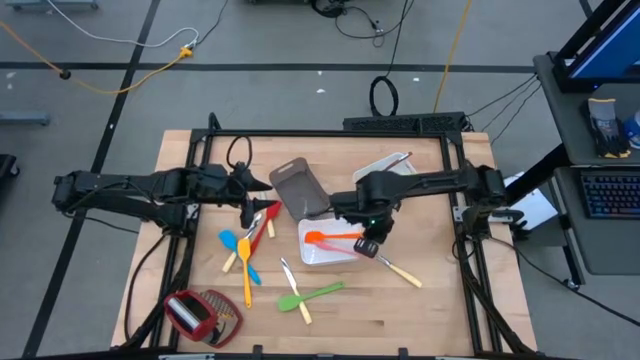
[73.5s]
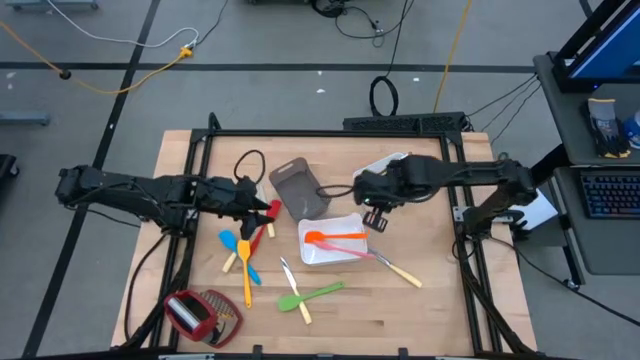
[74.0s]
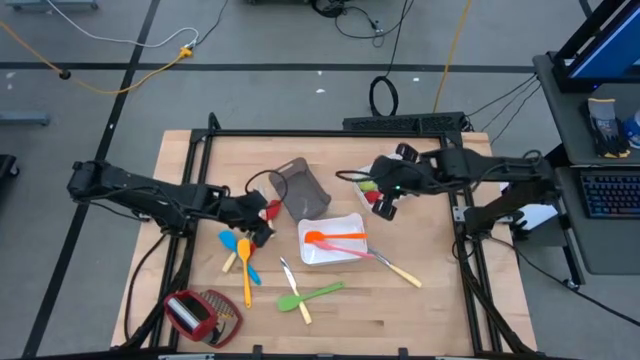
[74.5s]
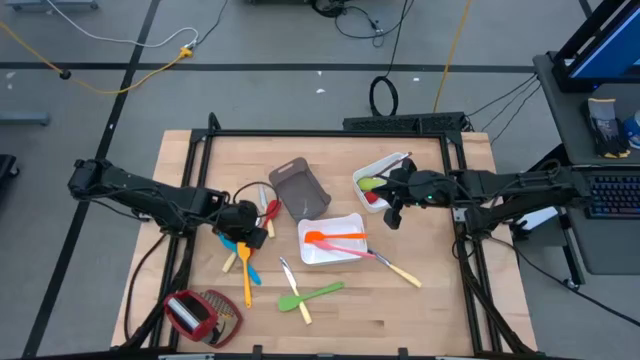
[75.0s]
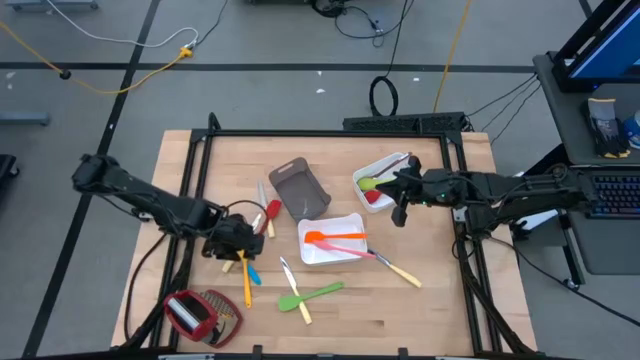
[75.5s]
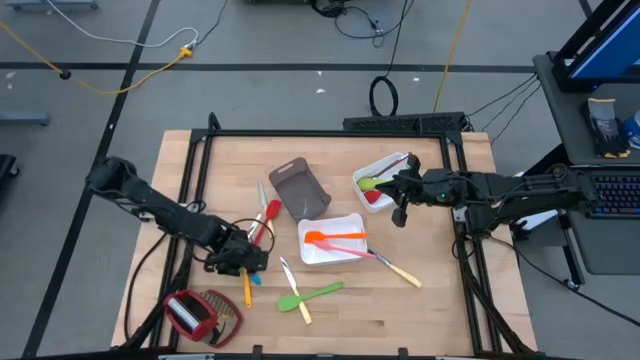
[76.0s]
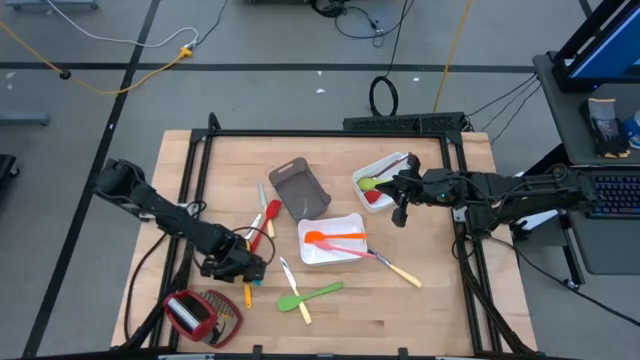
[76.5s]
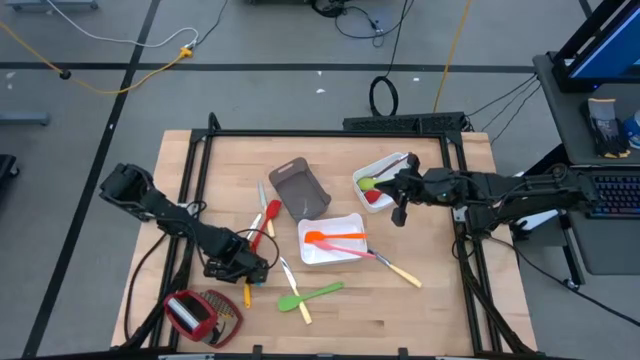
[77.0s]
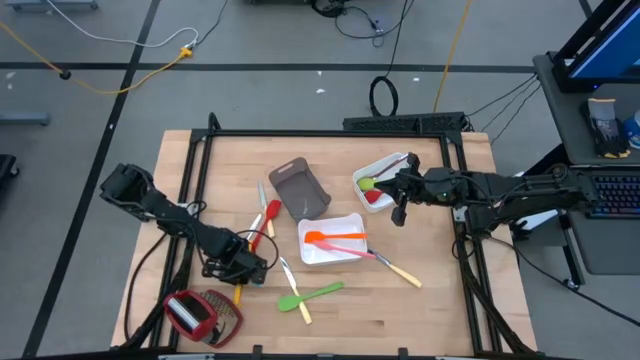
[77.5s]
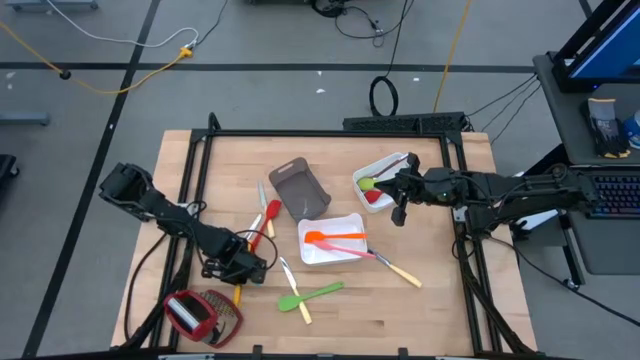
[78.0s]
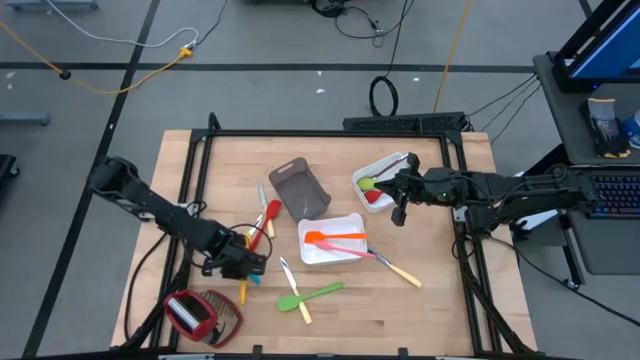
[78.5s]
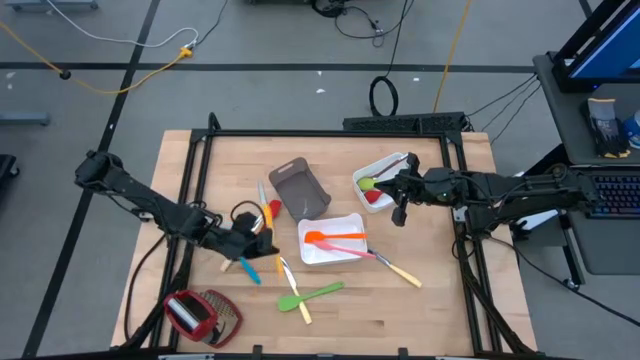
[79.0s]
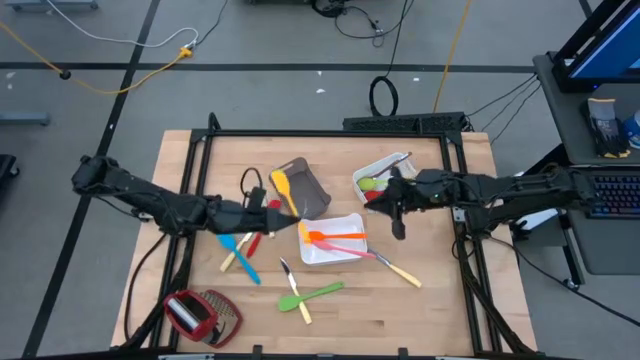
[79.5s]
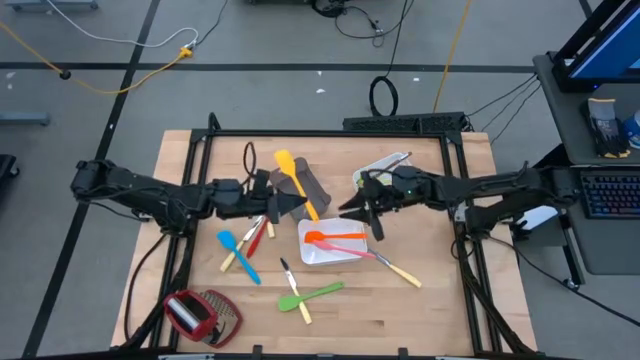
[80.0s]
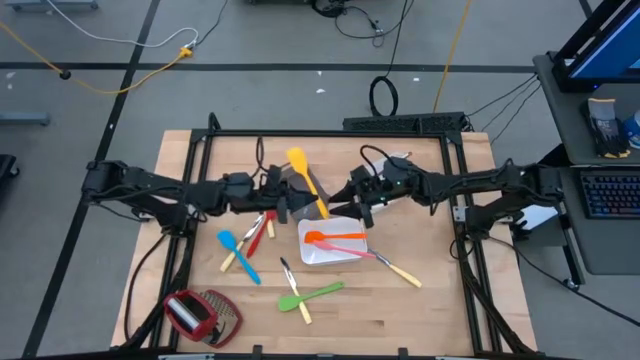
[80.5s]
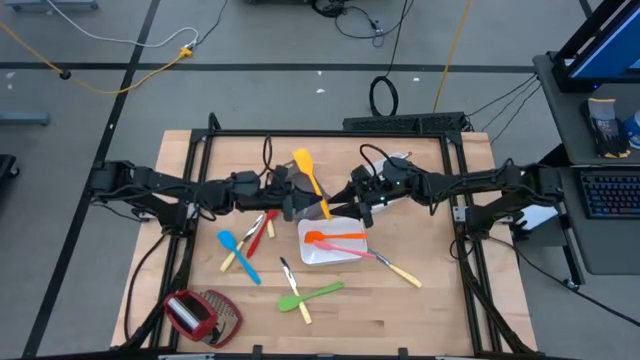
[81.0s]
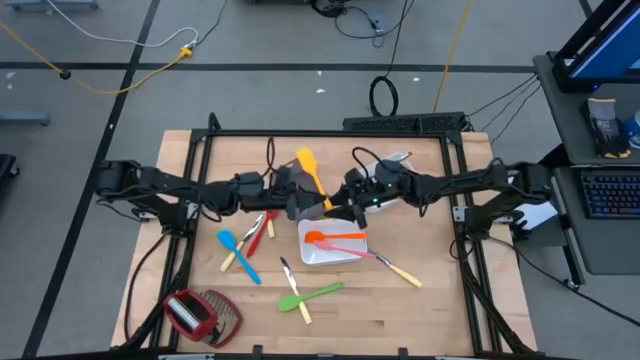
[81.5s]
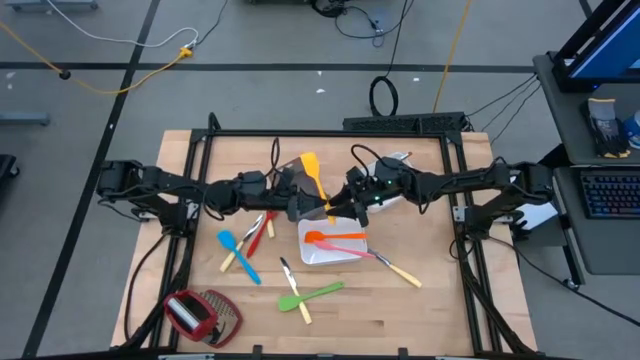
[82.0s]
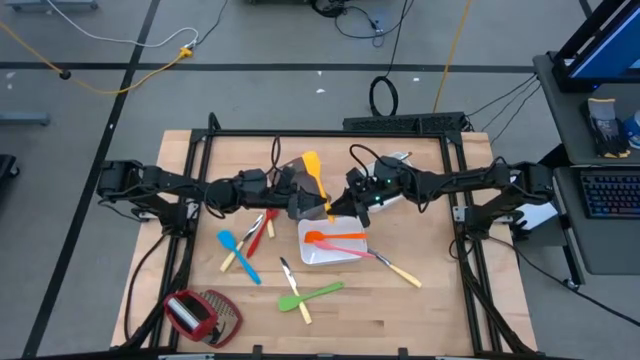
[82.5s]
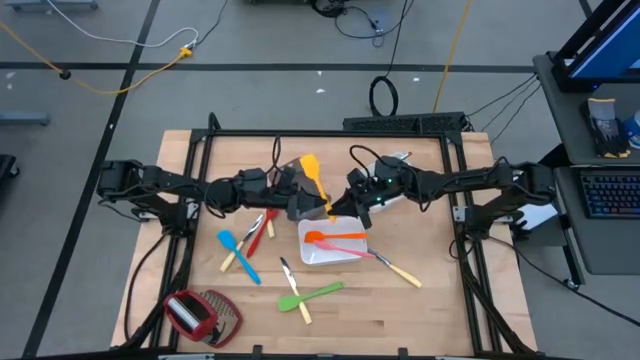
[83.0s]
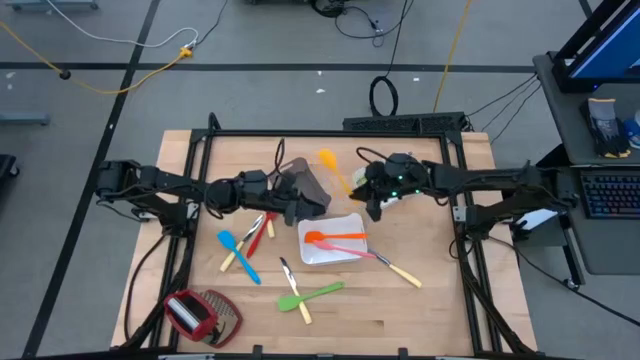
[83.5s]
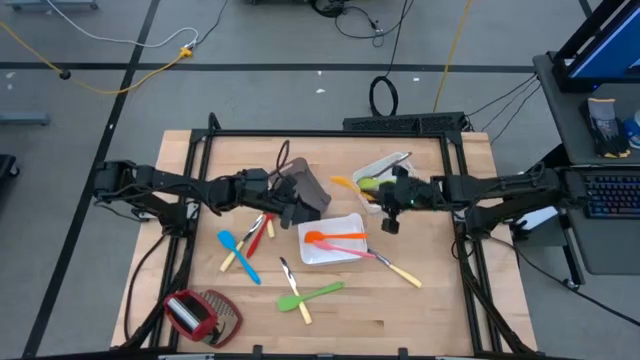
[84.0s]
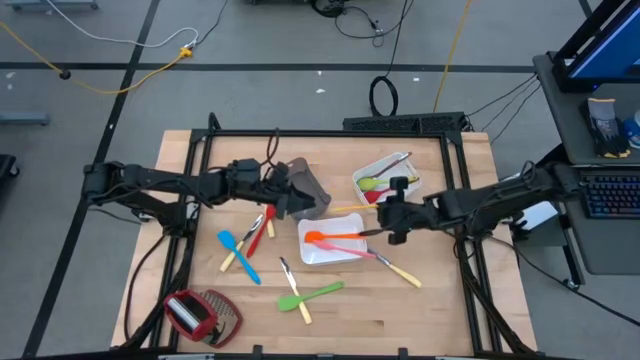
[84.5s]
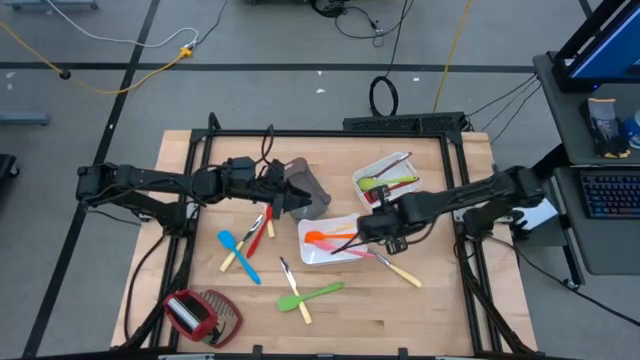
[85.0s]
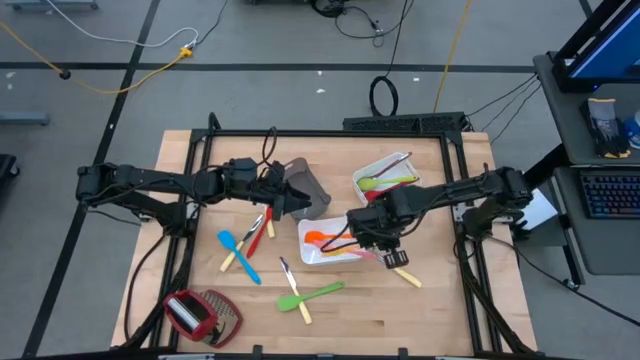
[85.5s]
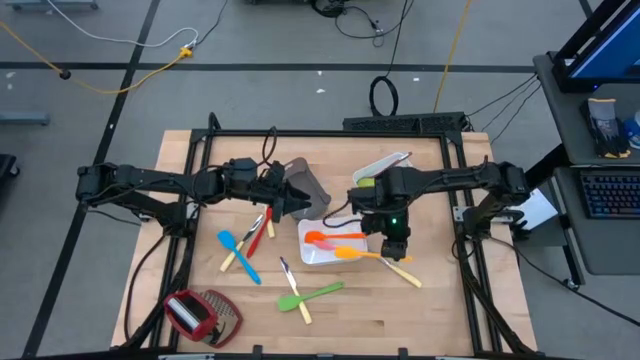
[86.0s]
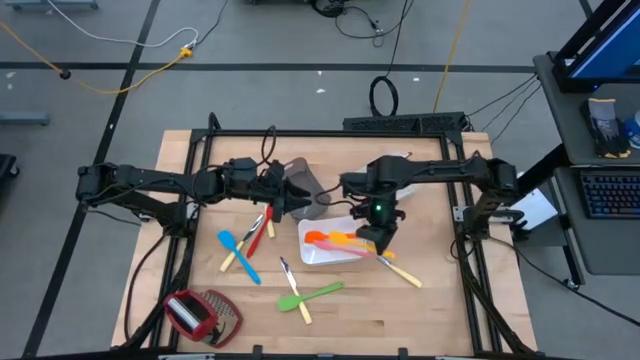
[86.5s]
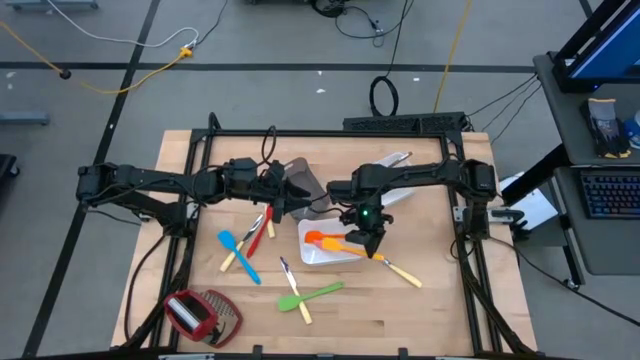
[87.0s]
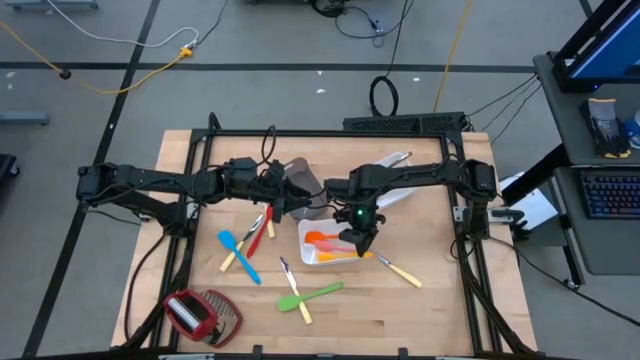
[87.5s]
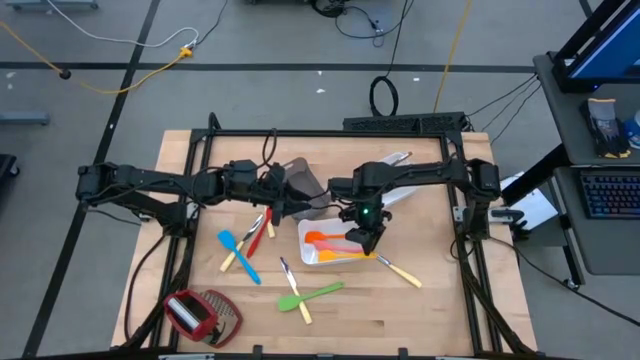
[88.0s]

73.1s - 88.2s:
Task: Pick & Place Kitchen Items
Put the yellow spatula into bottom white bin

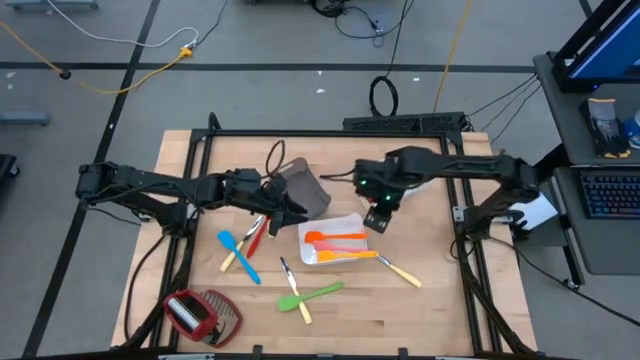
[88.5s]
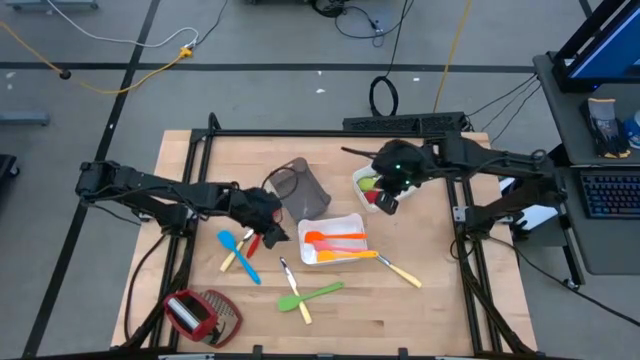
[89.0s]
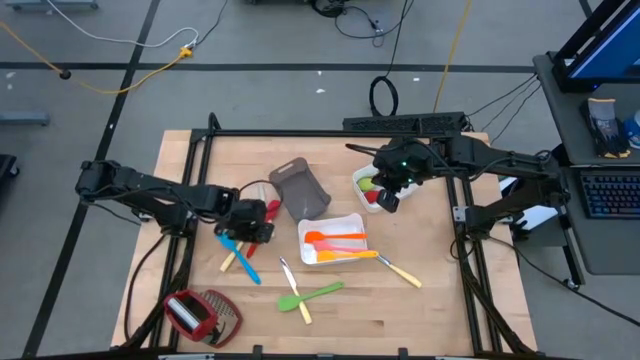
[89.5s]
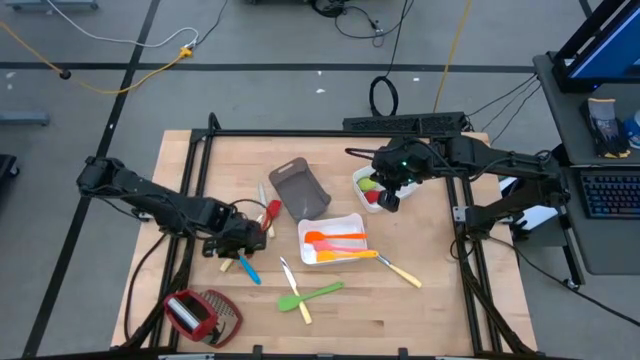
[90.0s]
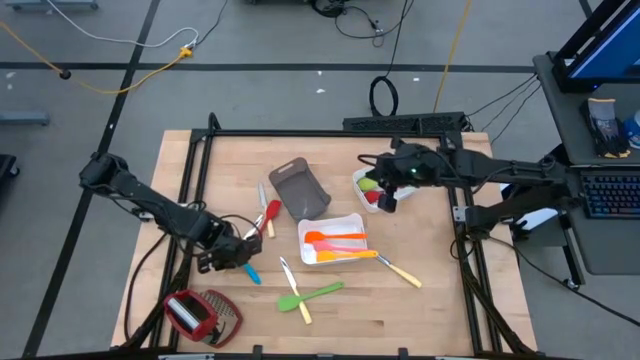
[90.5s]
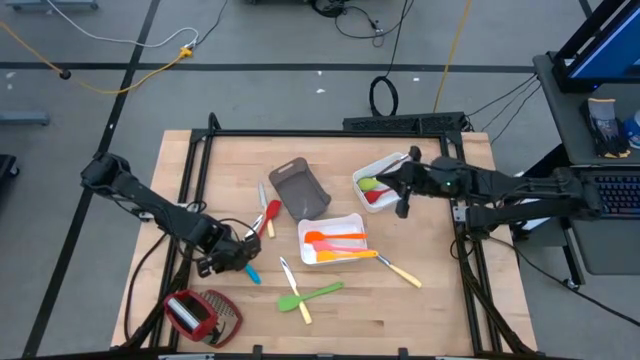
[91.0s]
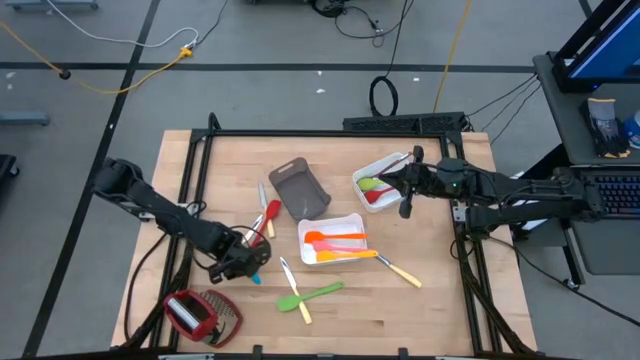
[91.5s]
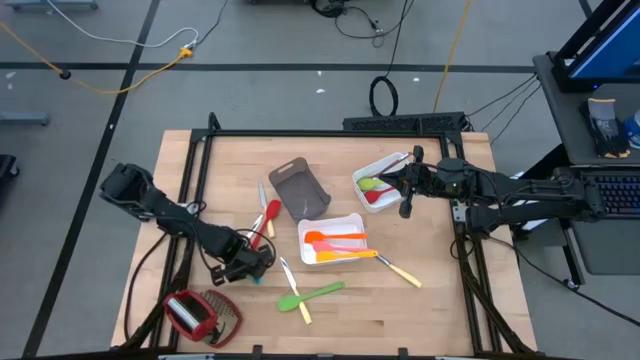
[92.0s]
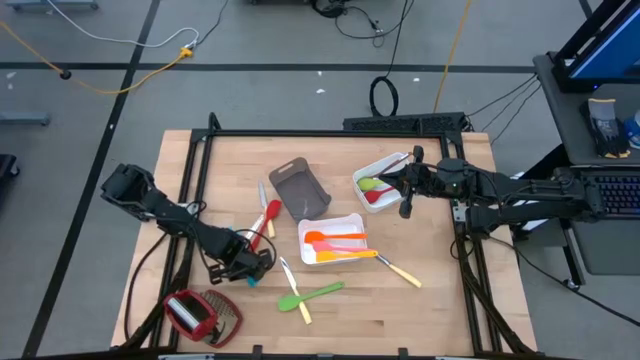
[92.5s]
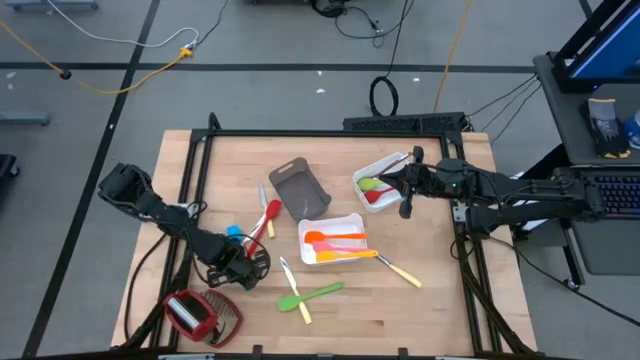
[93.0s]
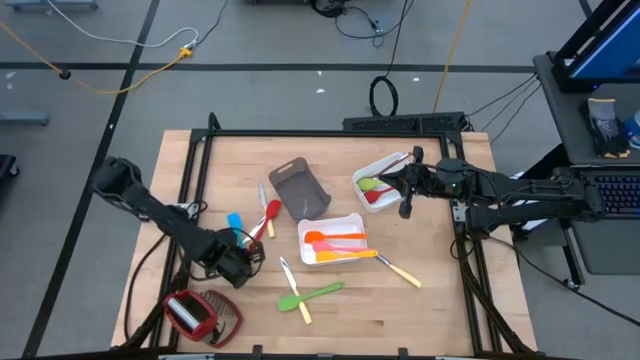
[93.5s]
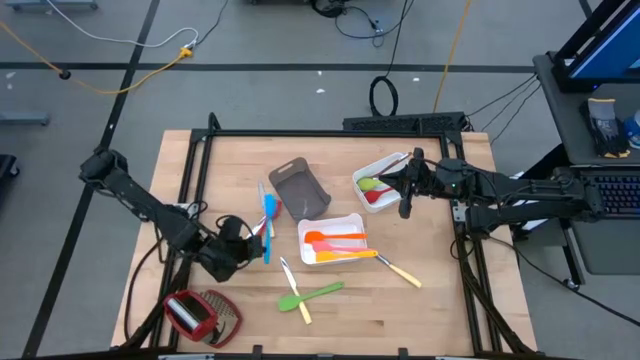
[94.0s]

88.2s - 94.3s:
Put the blue spatula into bottom white bin

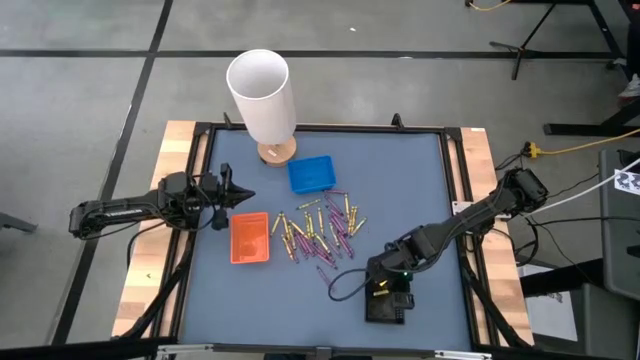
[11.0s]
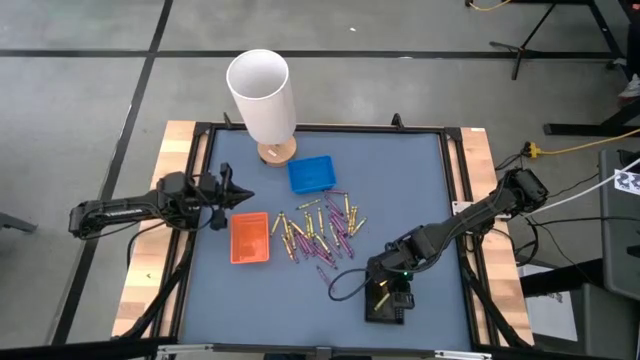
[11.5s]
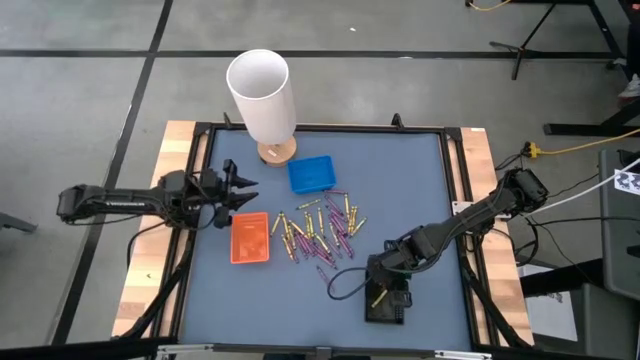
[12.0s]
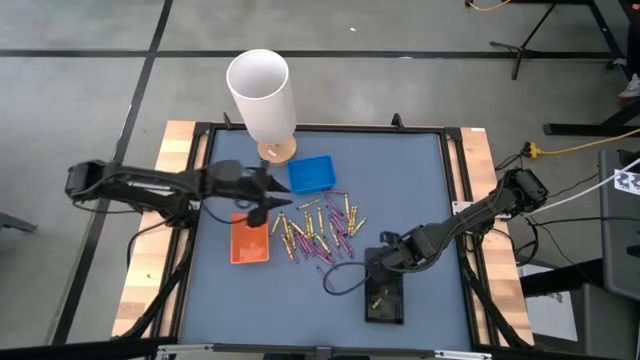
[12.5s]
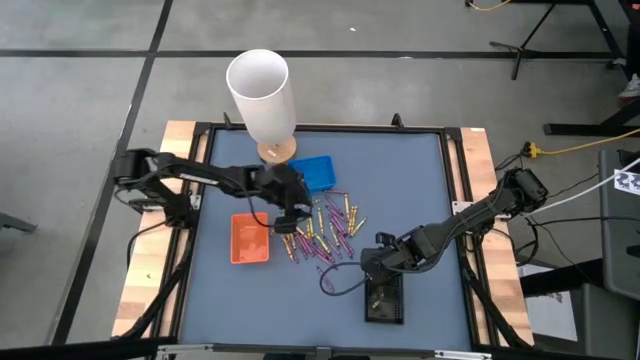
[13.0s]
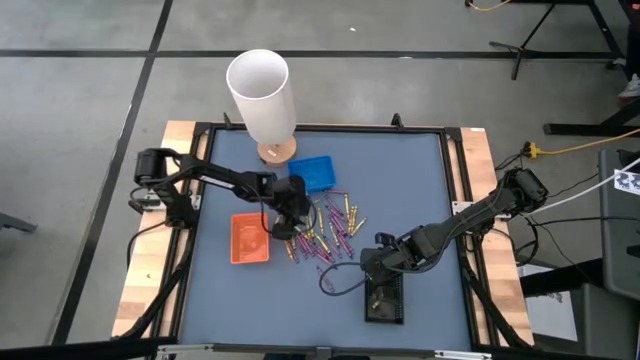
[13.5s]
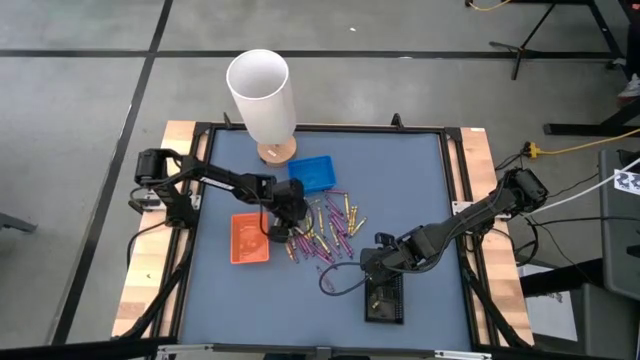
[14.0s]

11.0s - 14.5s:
Task: Sort crayons
Put the yellow crayon into the orange bin
